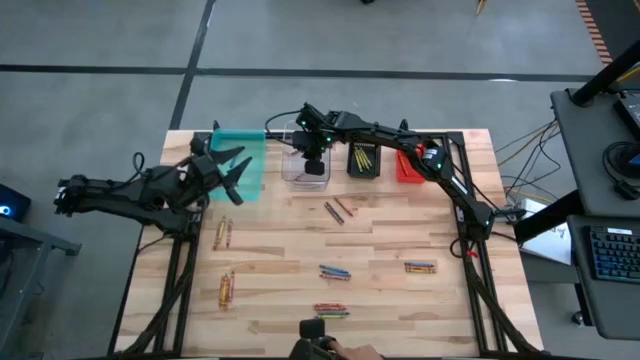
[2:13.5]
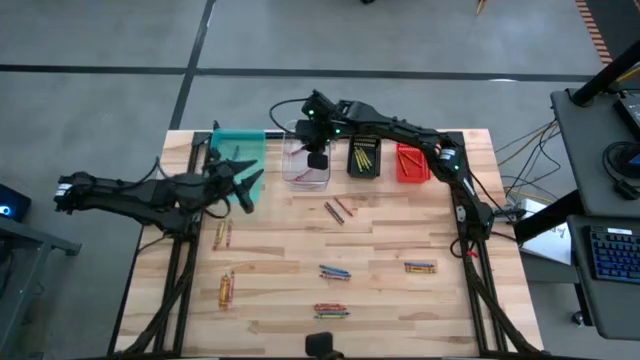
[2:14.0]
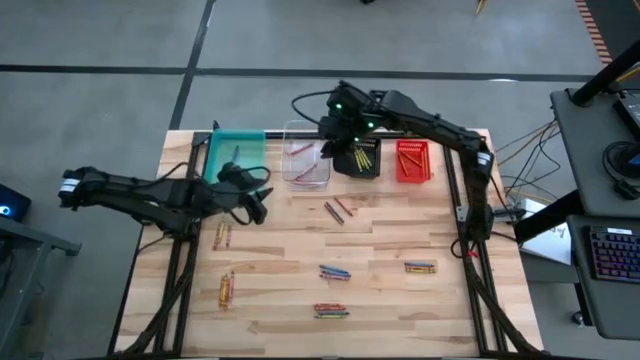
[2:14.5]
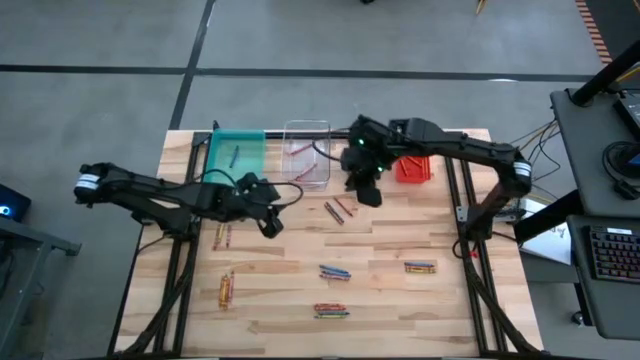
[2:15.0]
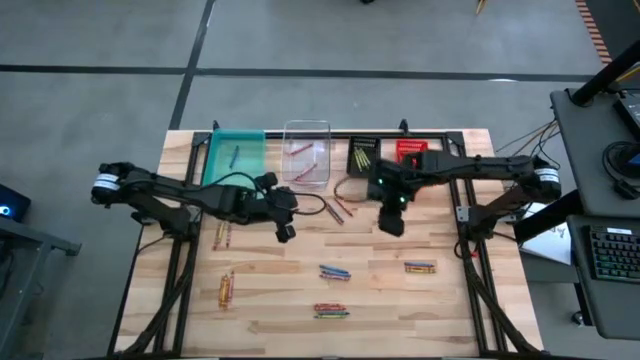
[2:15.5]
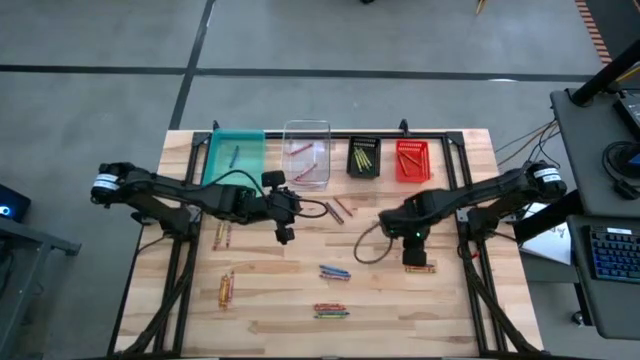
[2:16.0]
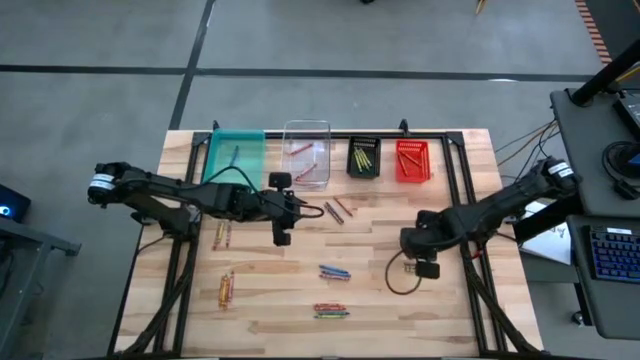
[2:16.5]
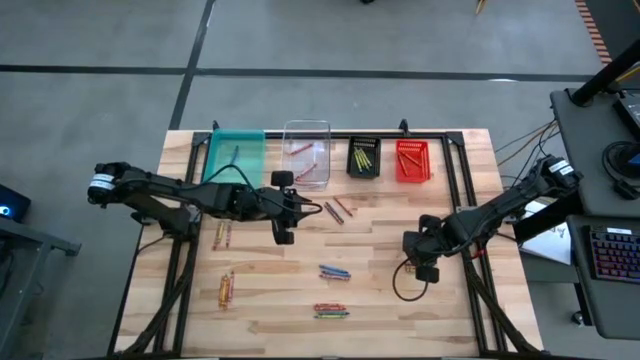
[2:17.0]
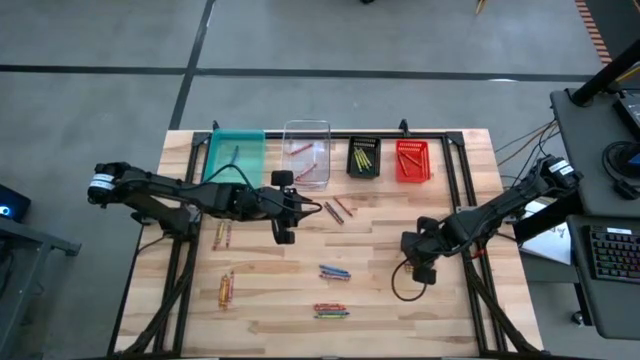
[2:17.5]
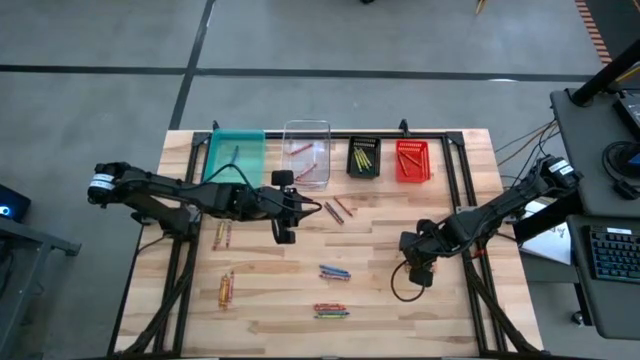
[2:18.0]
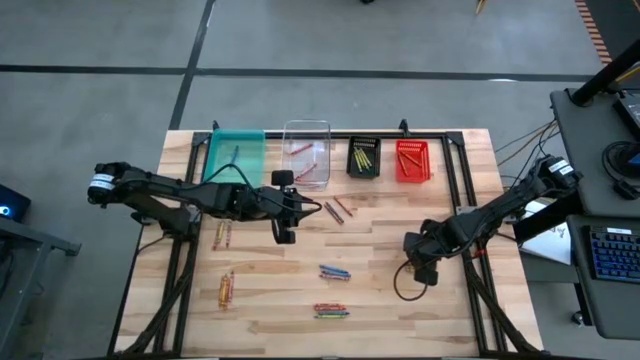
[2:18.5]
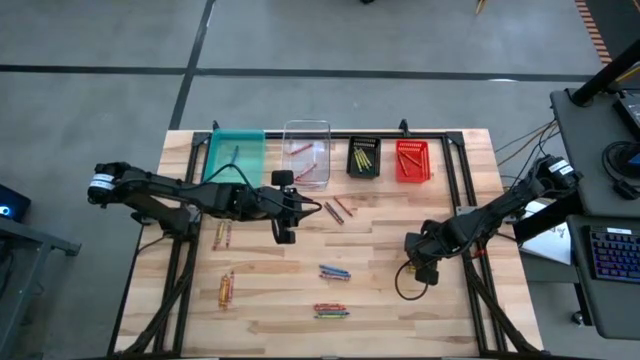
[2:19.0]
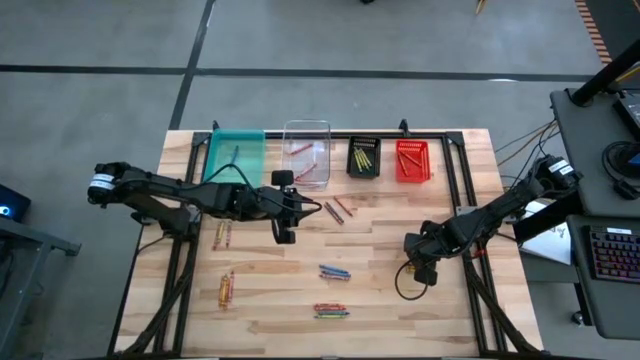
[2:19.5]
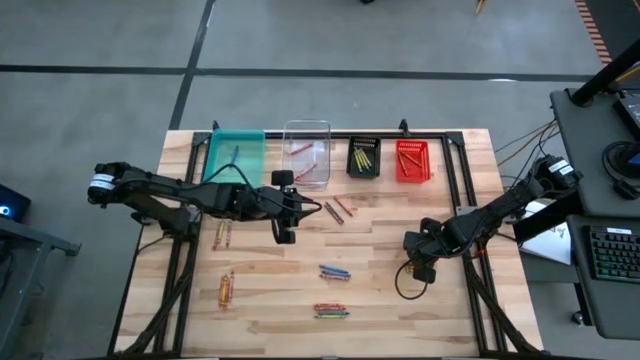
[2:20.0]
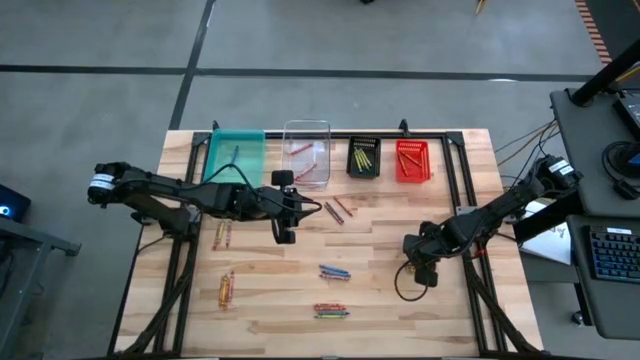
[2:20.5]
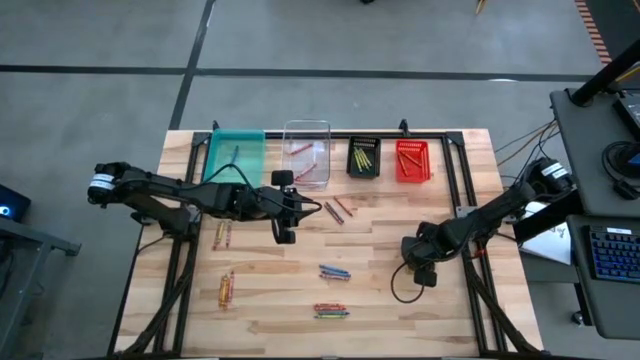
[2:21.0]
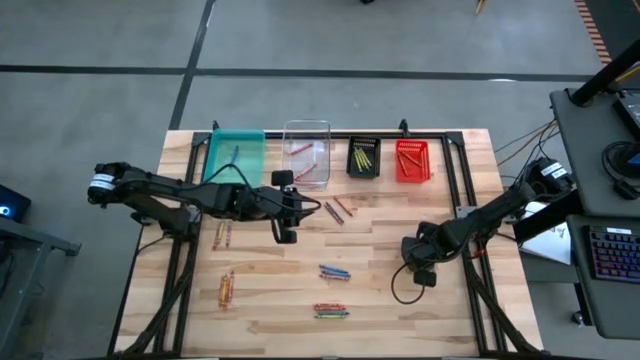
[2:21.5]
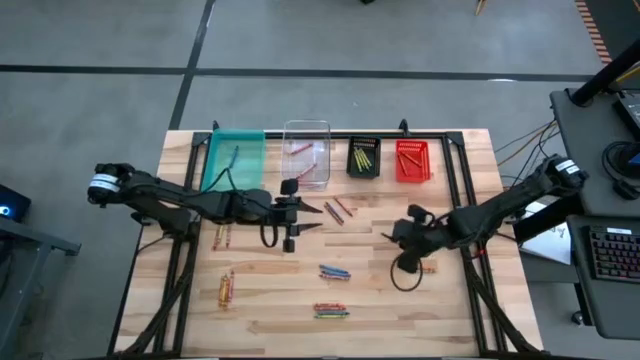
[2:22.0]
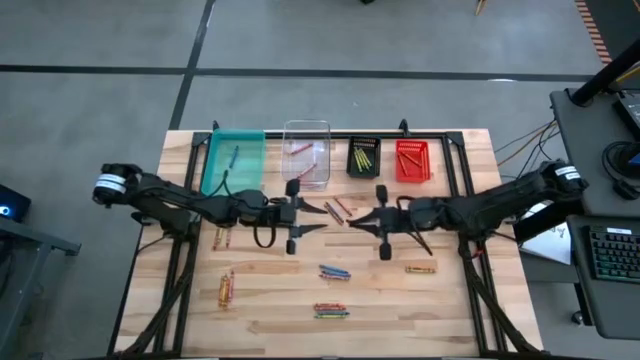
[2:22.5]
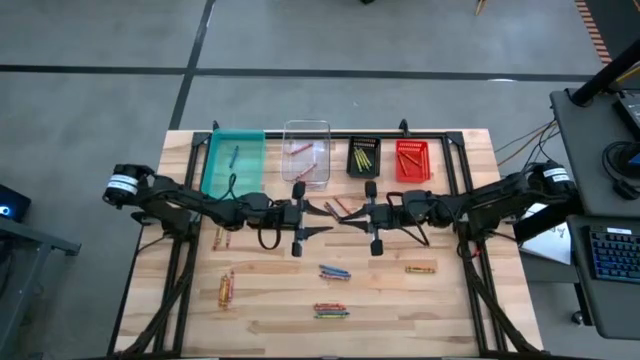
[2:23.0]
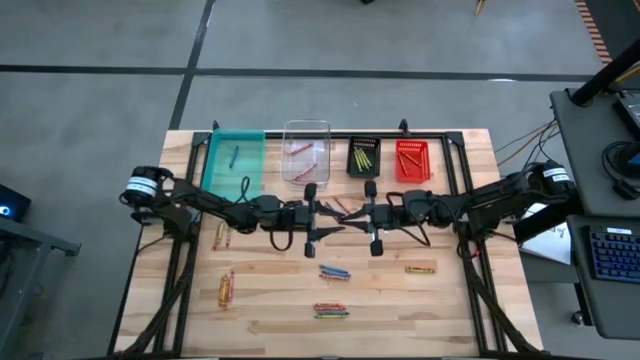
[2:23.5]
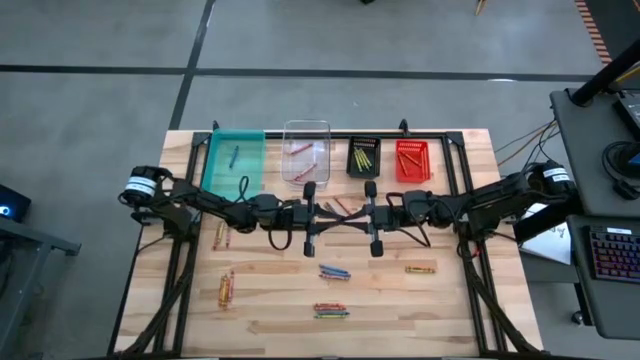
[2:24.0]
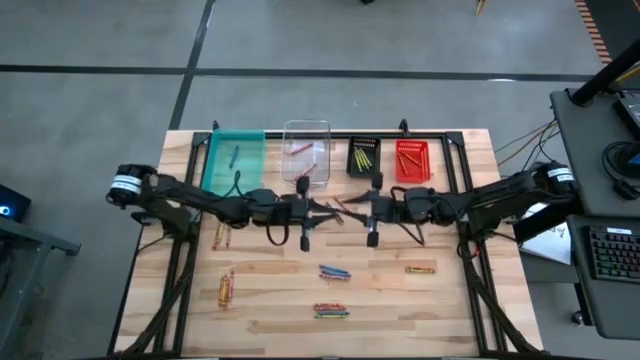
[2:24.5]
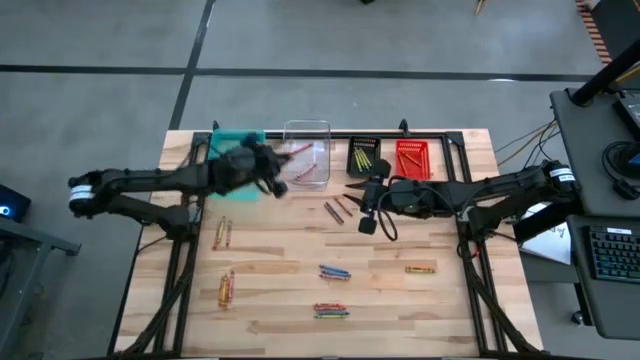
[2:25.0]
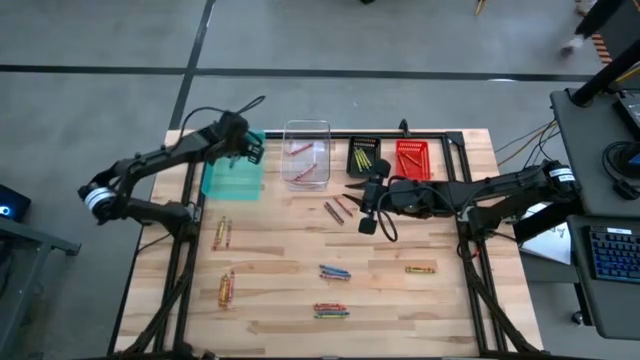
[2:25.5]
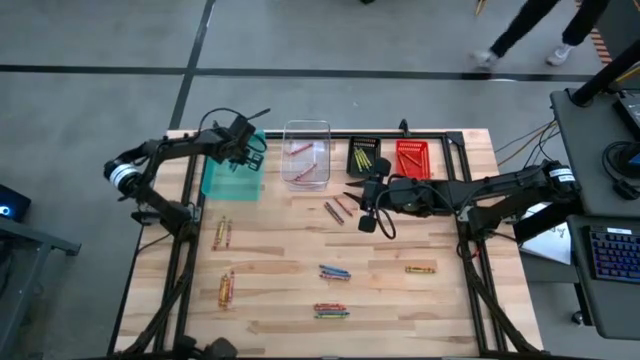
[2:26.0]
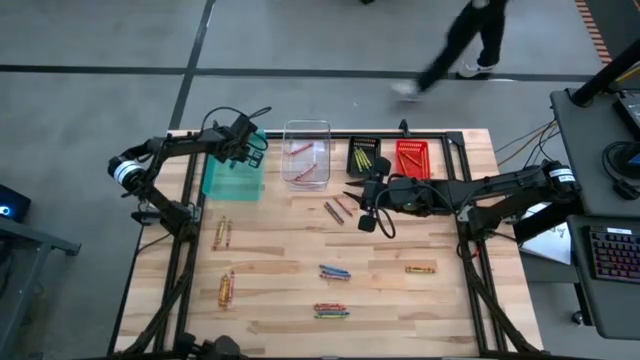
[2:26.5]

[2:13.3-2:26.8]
Task: Sort crayons
Put the blue crayon into the green transparent bin

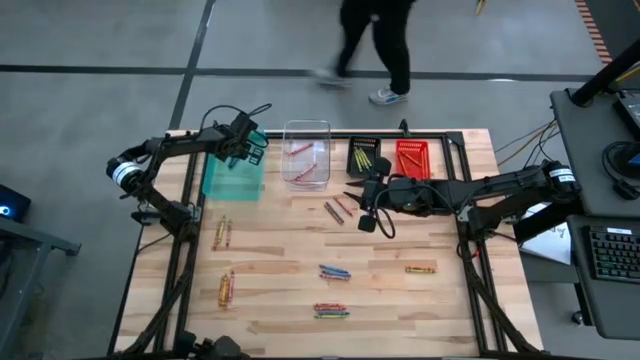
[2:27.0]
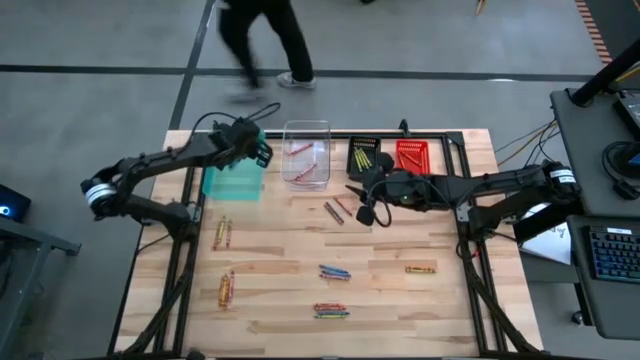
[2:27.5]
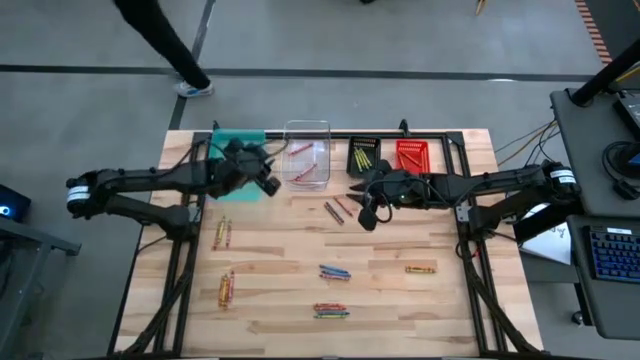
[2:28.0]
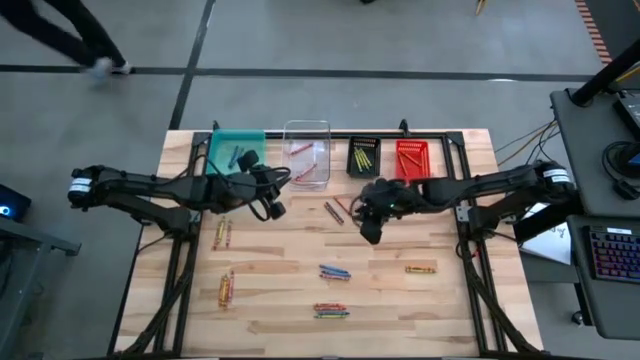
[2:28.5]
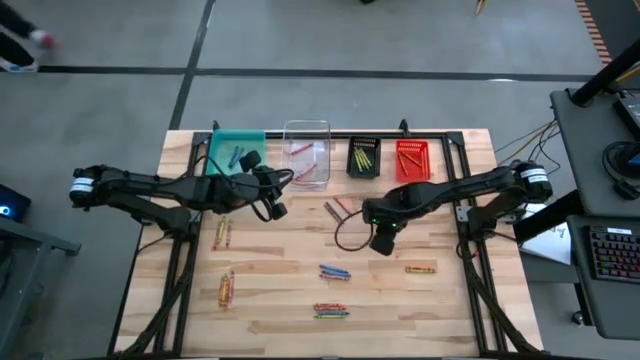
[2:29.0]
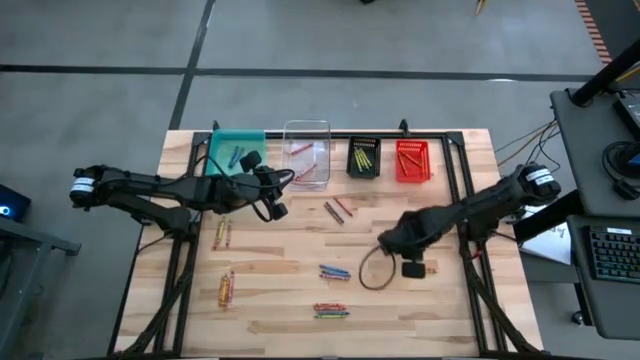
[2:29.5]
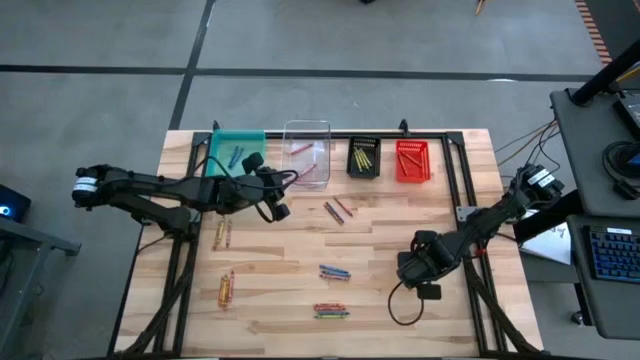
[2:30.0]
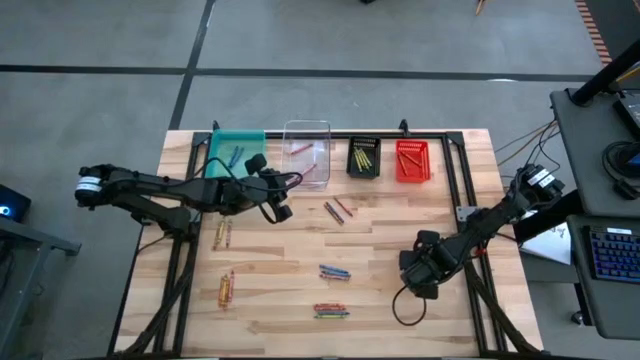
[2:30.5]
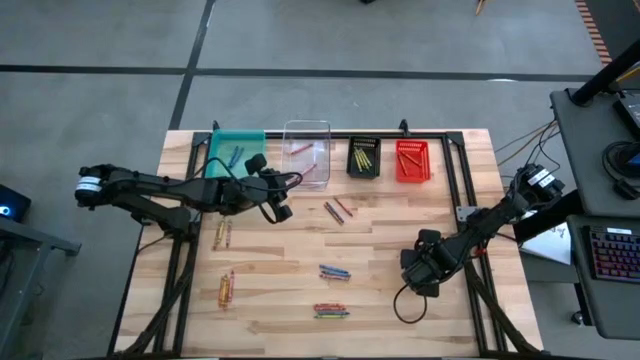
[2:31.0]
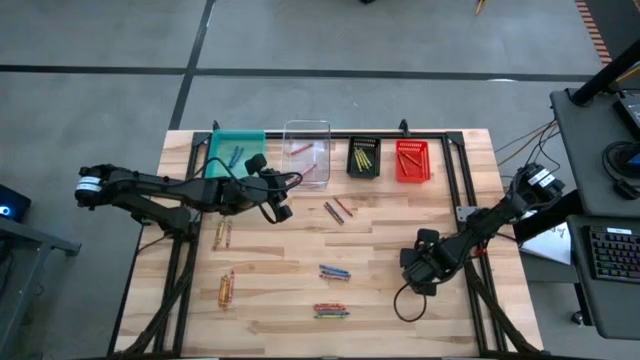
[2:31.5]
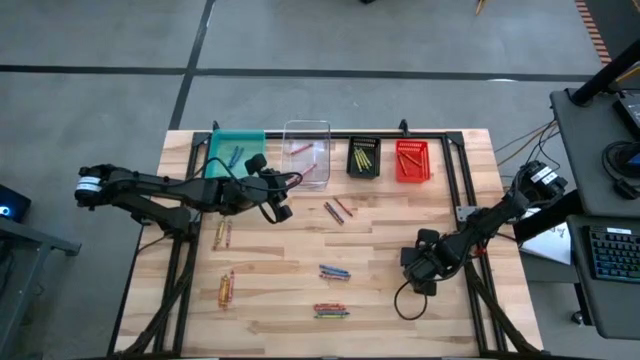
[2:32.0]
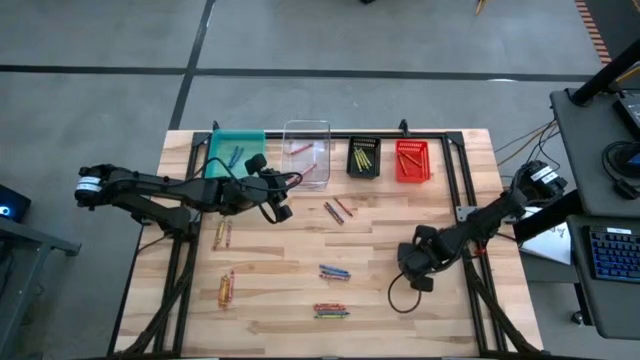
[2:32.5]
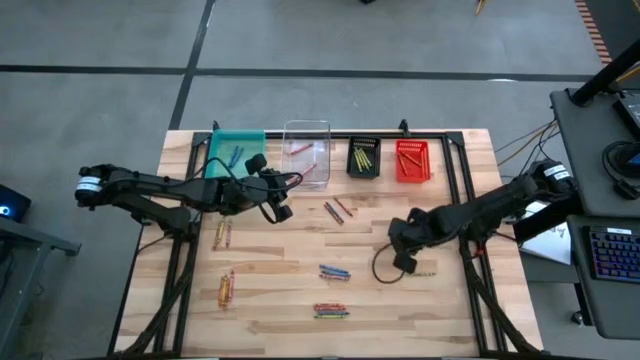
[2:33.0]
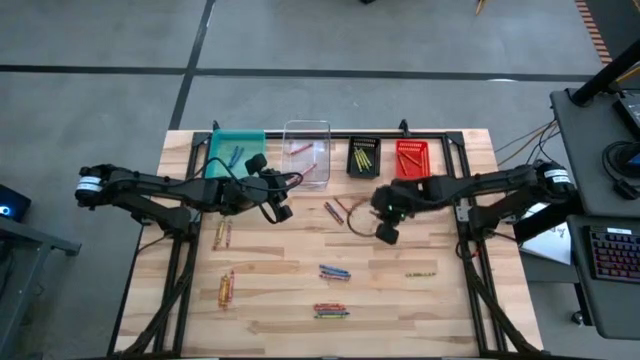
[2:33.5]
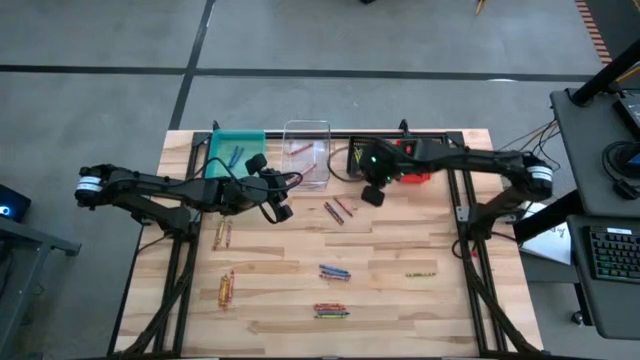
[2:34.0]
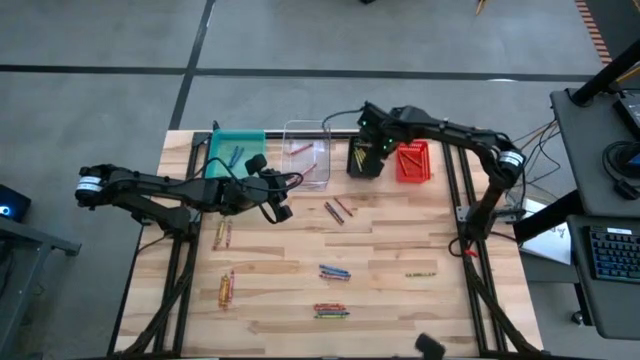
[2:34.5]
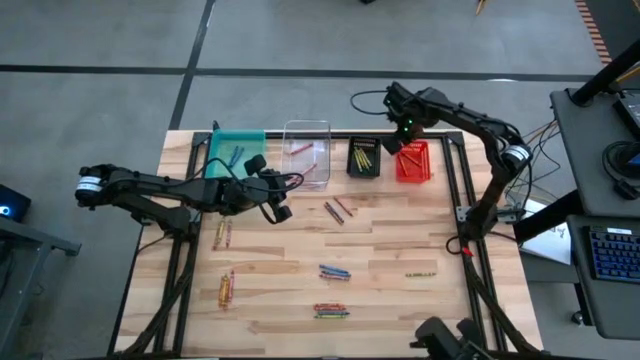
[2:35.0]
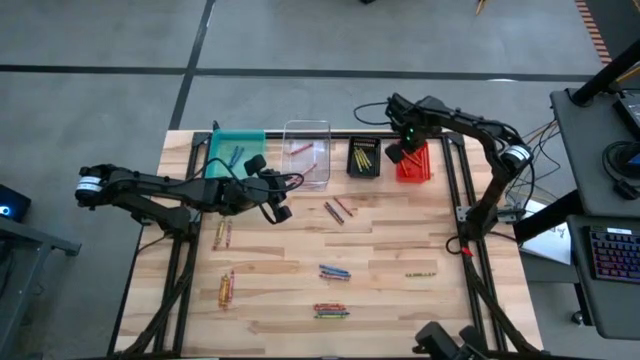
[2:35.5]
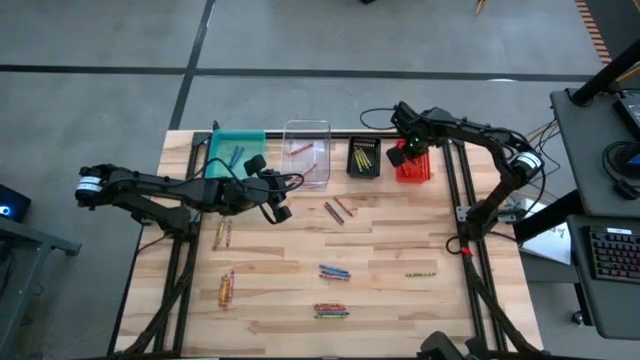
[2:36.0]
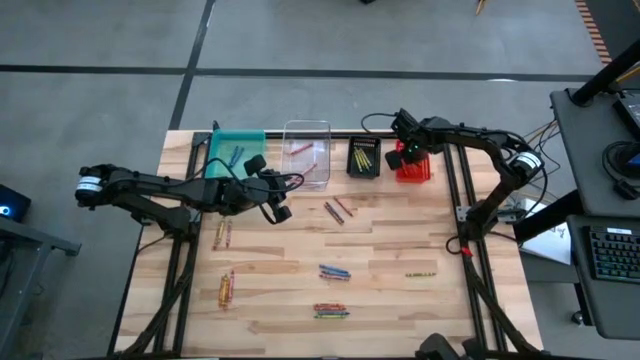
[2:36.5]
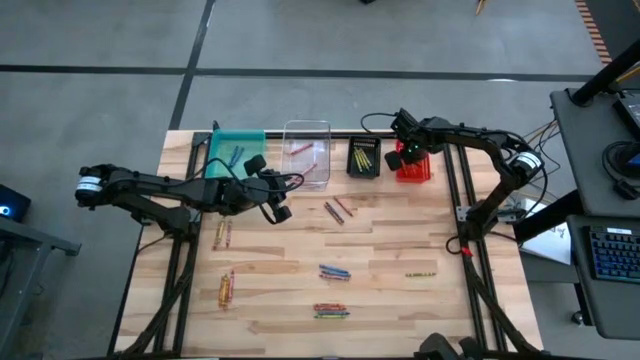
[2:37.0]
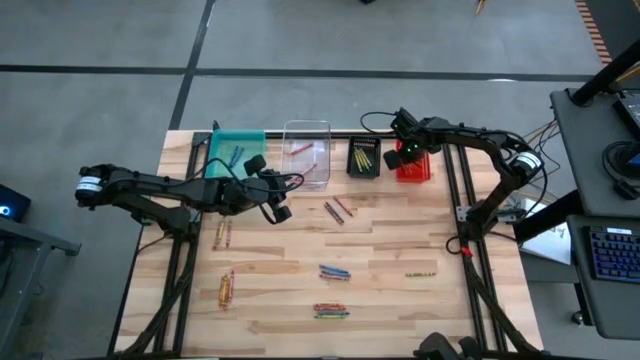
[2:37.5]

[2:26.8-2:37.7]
Put the orange crayon into the orange bin
